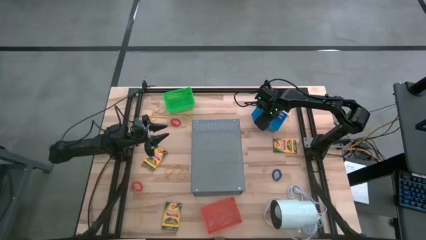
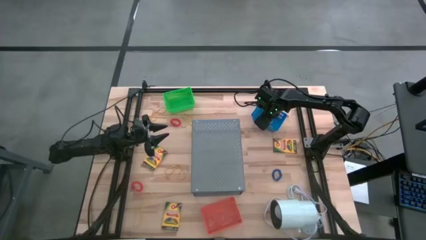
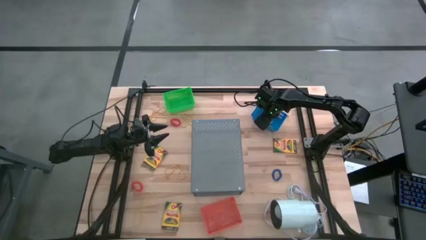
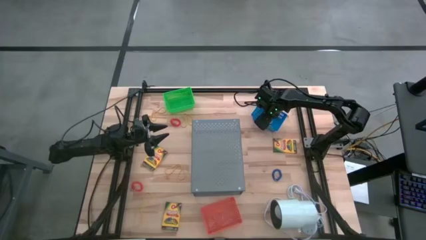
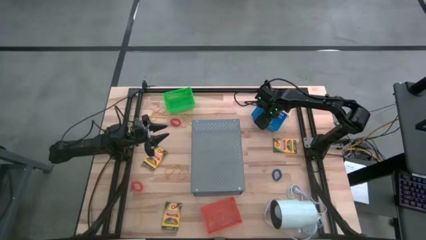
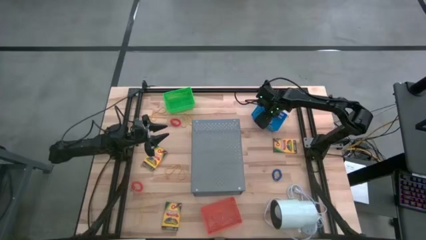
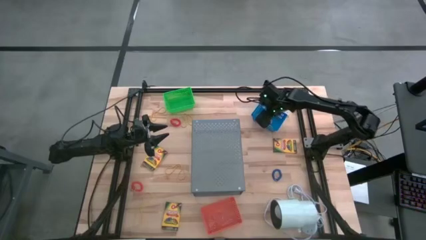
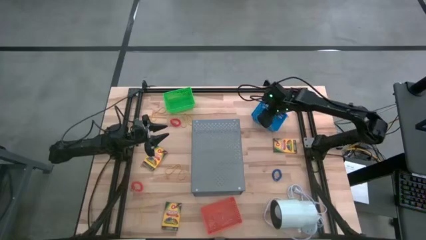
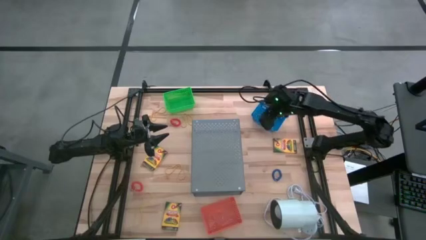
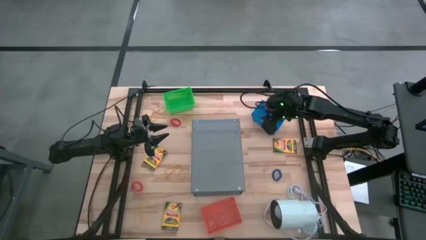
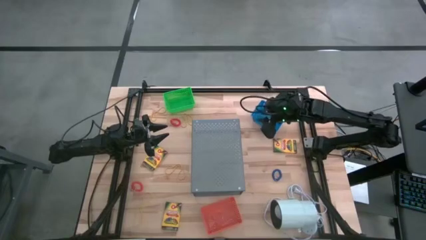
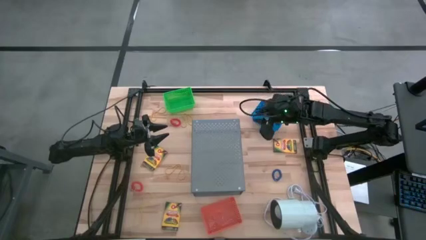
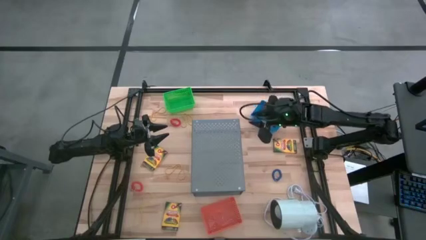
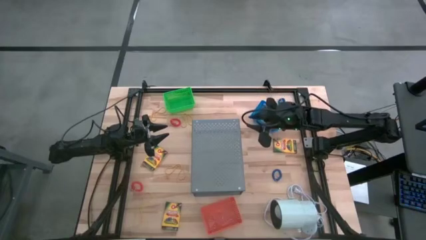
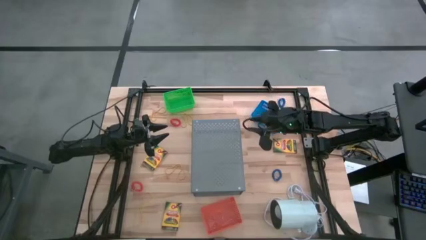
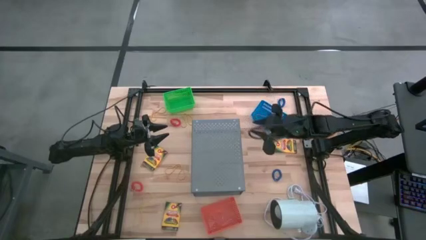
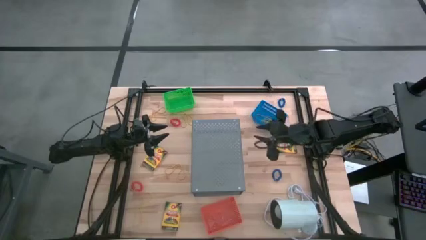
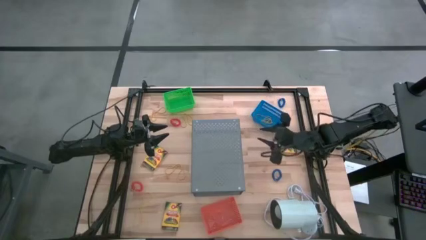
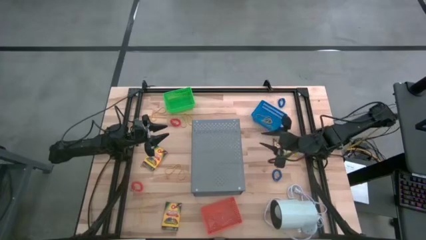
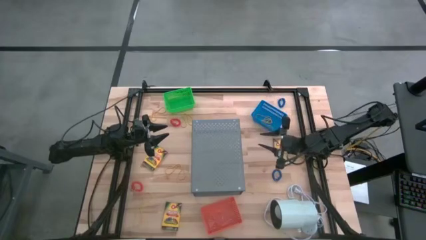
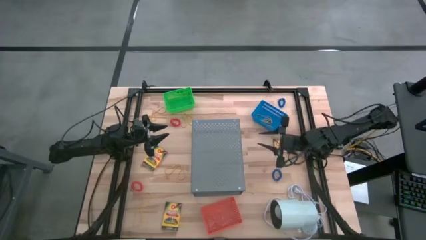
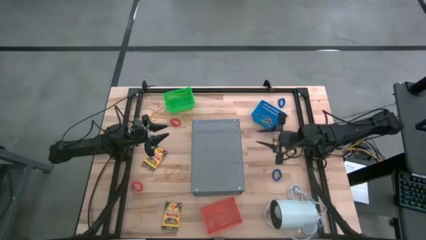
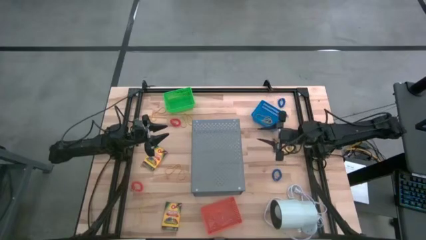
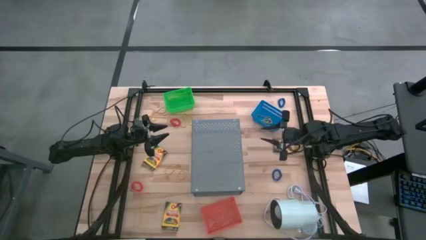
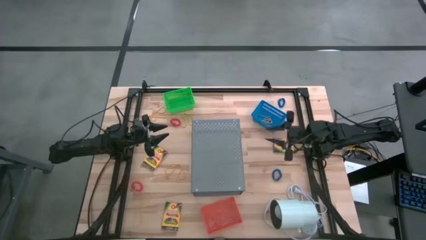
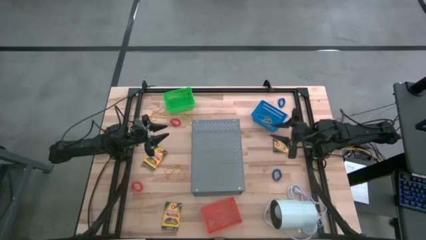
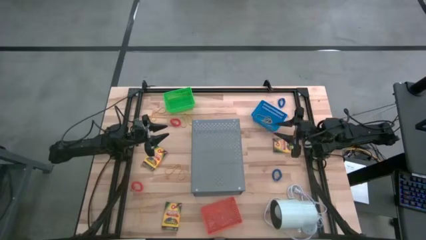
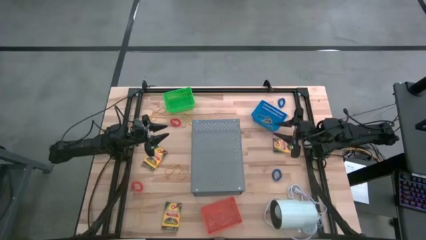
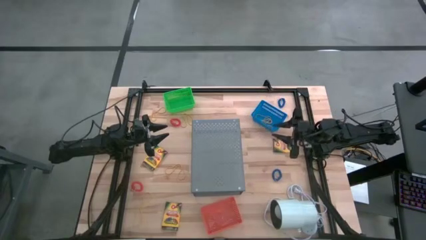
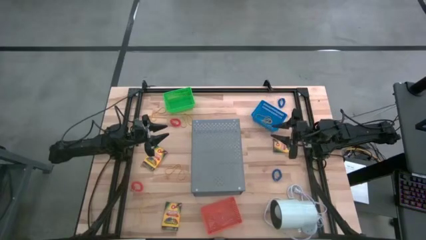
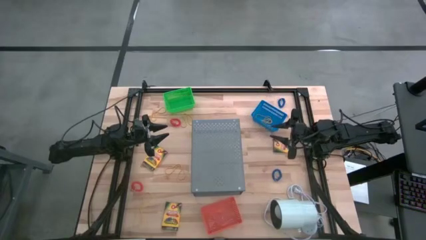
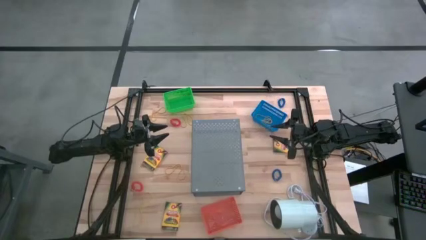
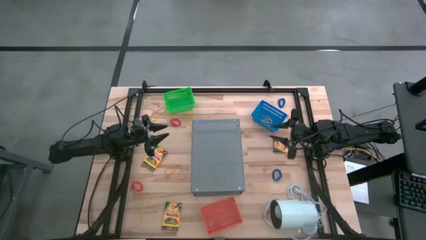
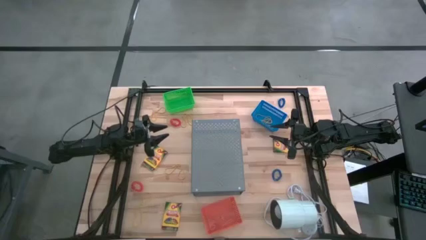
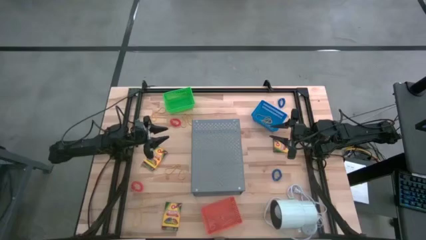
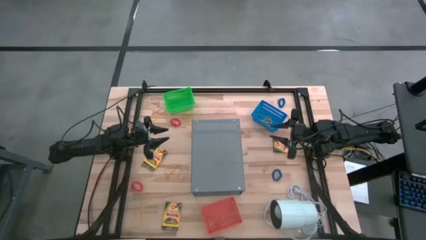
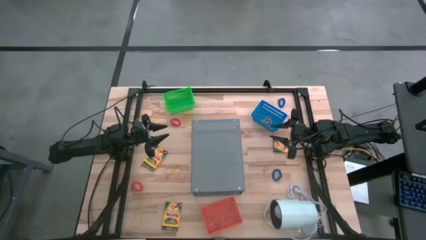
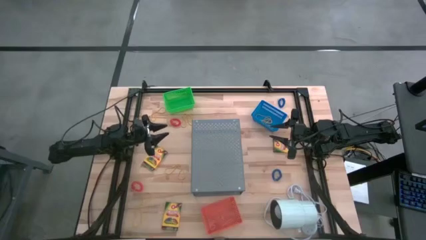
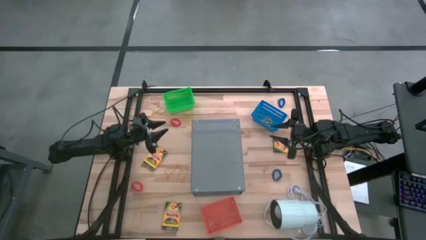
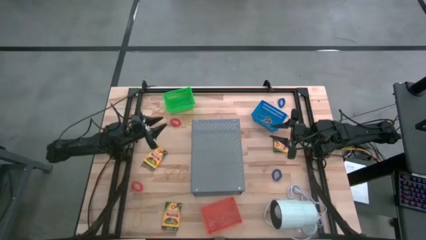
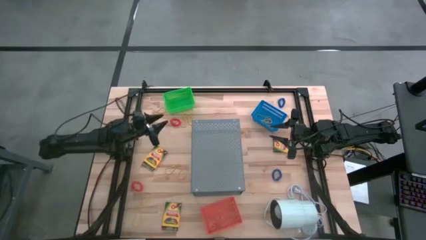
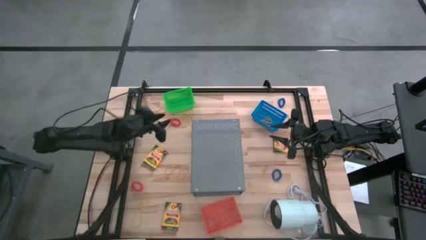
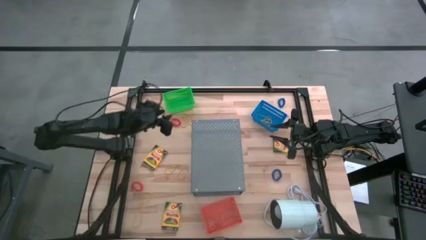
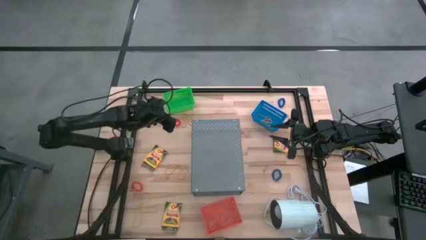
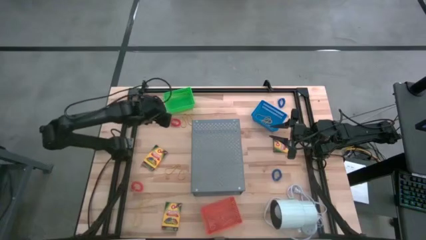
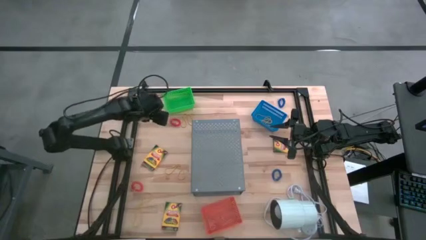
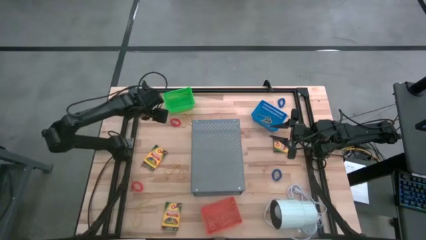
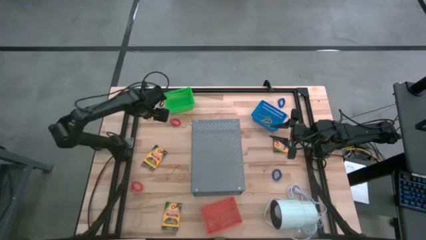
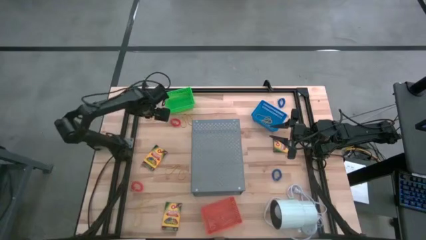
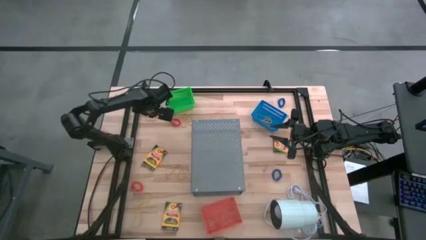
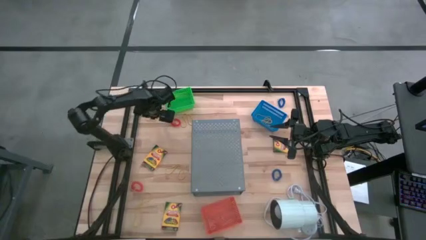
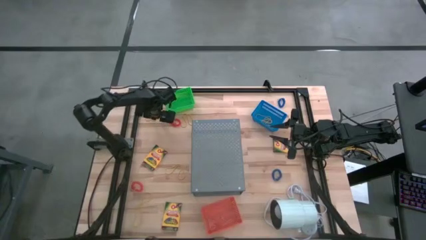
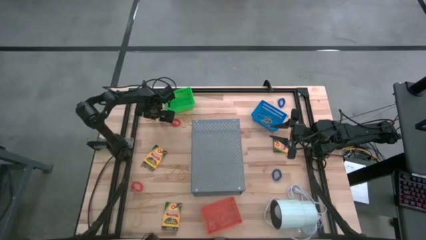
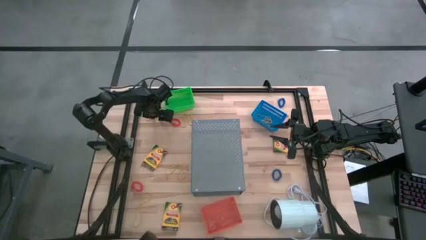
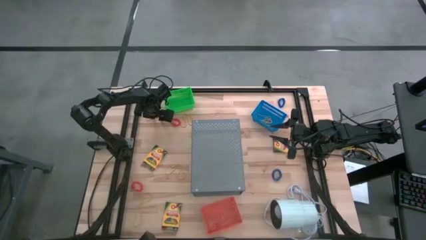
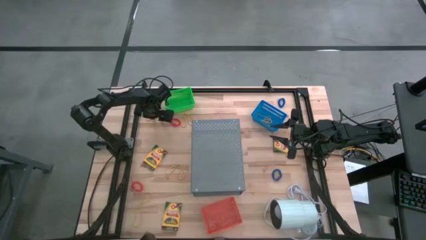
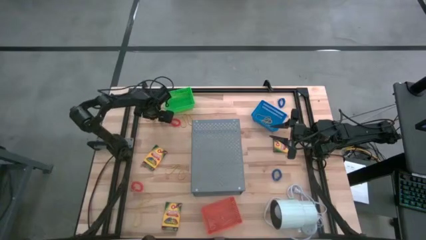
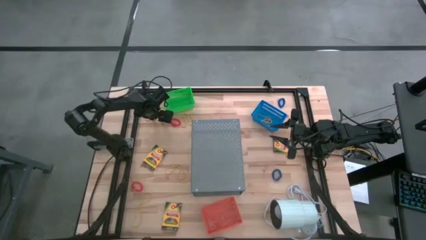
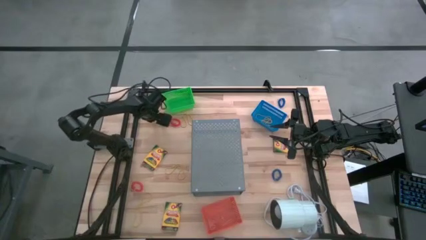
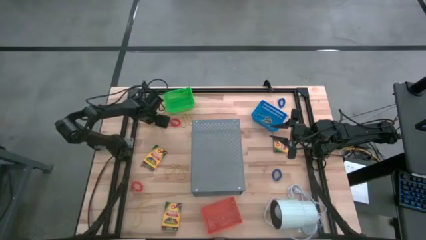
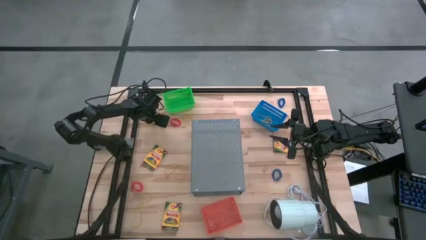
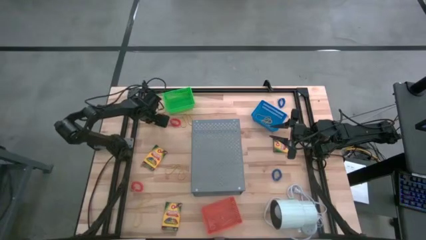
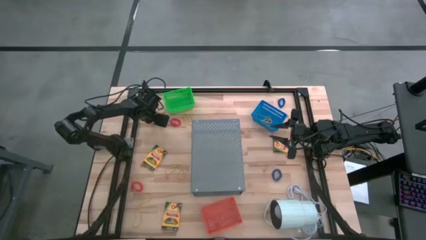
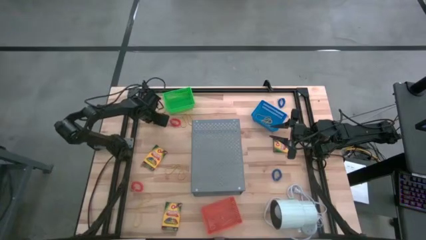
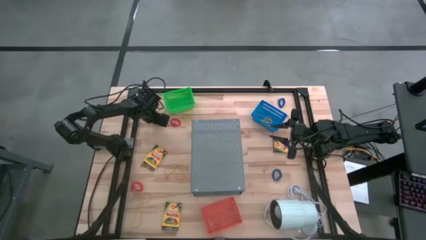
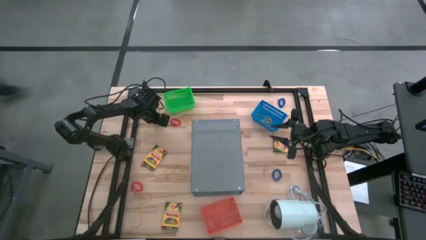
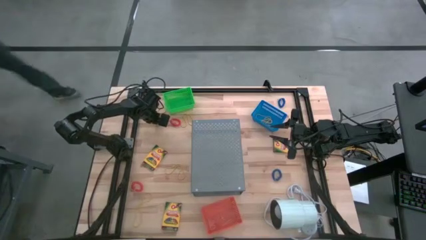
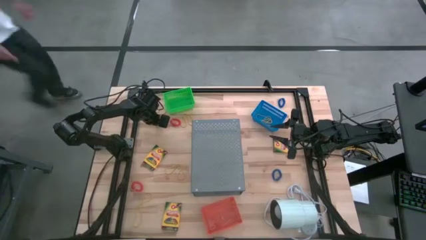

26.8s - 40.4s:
Task: Pick & Place Office Desk Supplies
Put the yellow rubber band into the blue basket

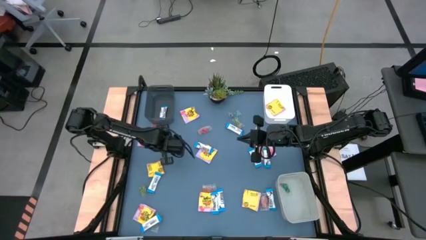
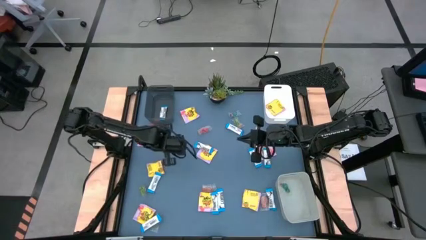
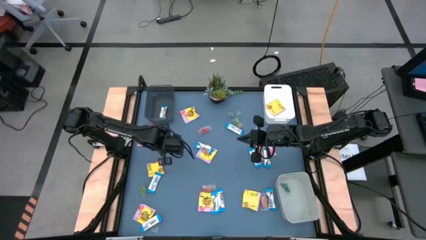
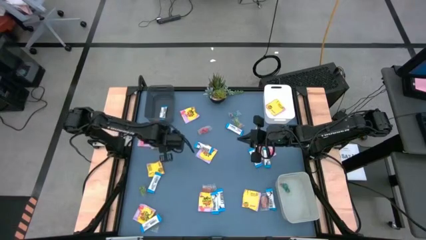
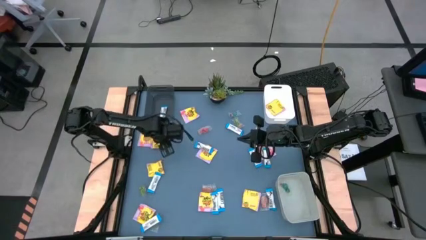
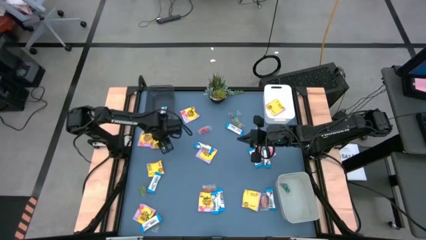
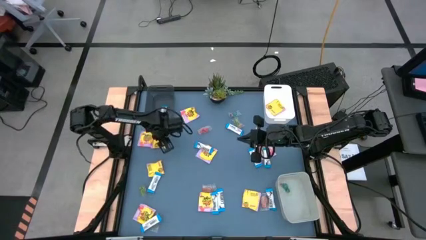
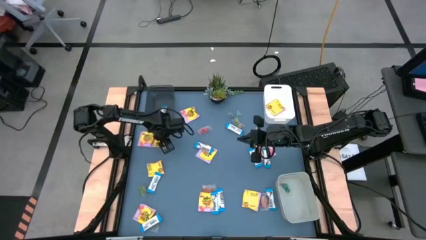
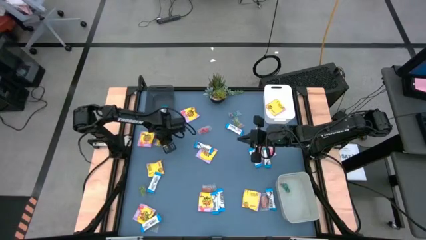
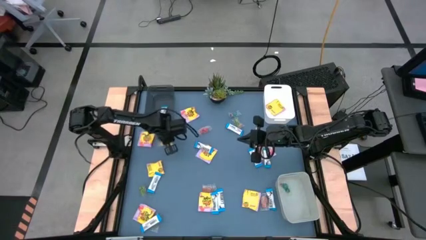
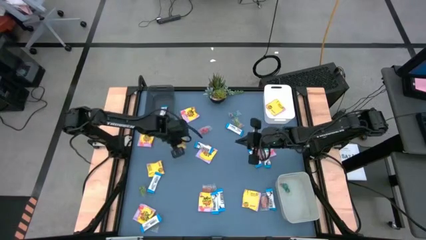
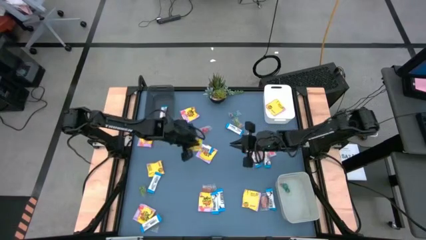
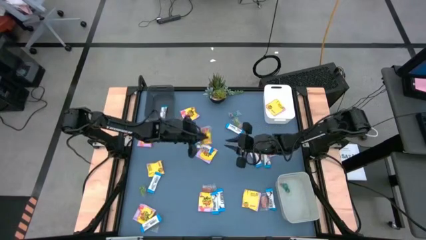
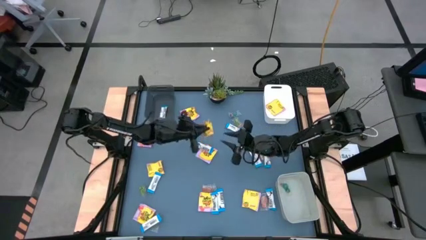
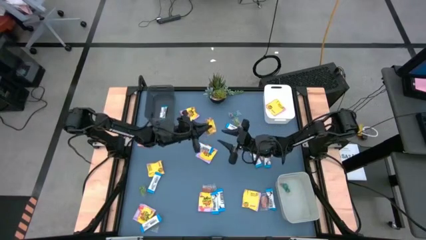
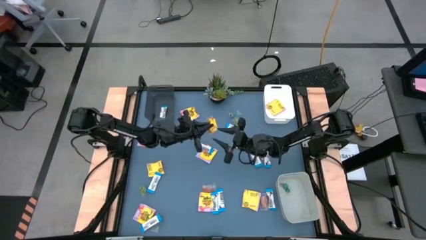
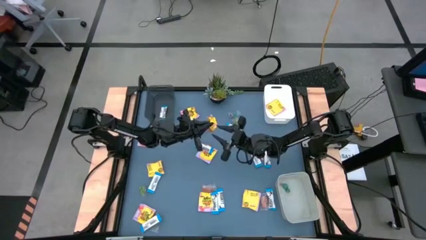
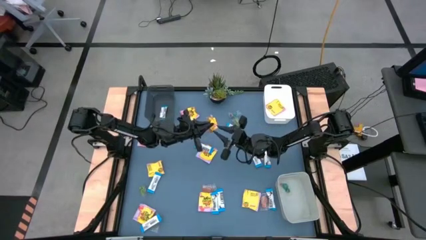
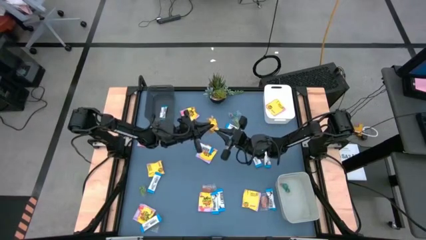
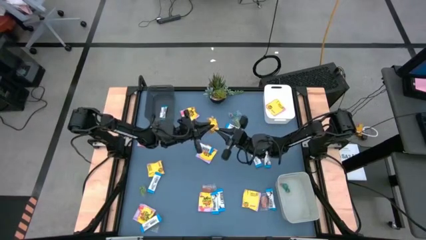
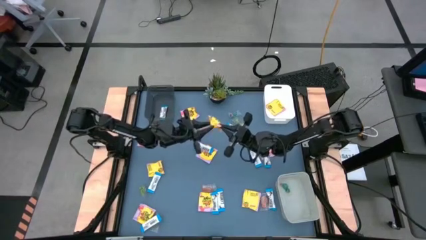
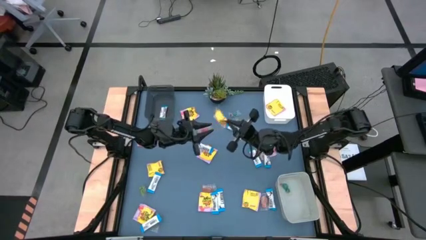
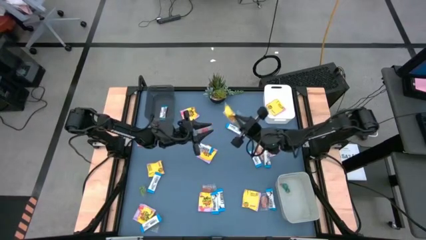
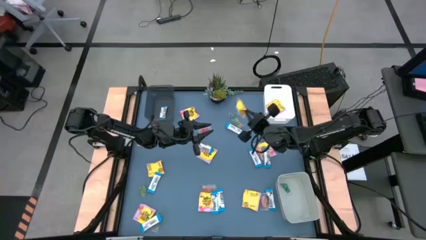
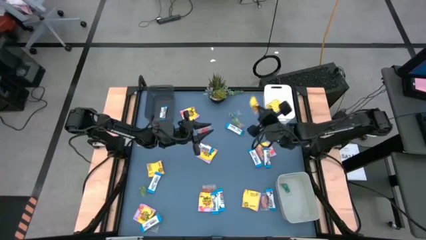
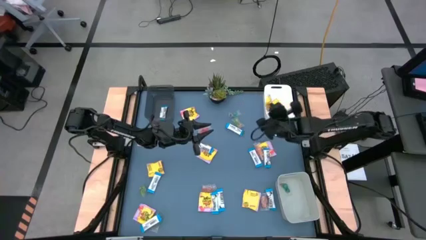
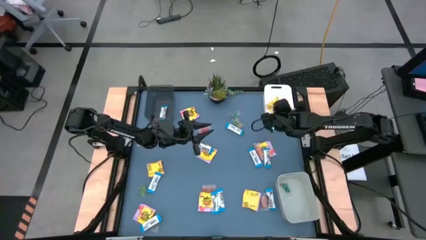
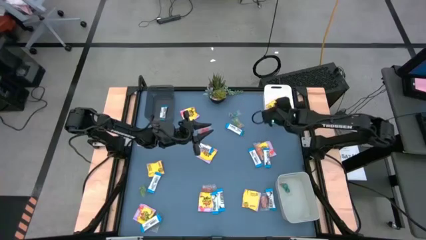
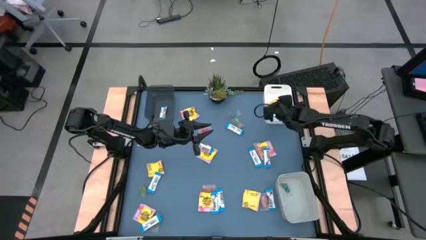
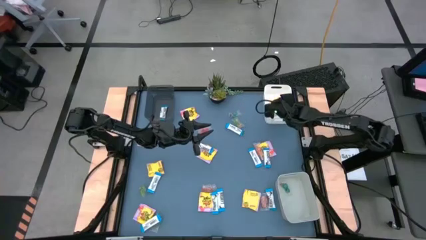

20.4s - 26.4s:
Task: Sort candy
Put the yellow candy pack into the white bin
